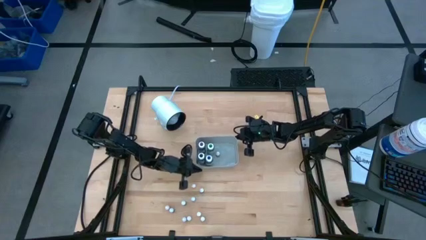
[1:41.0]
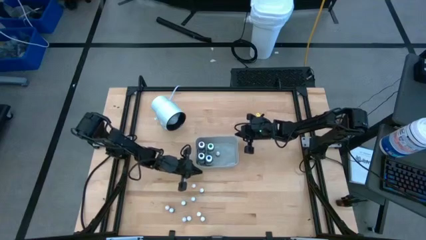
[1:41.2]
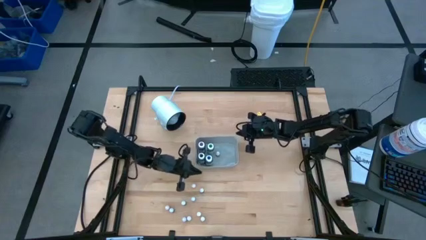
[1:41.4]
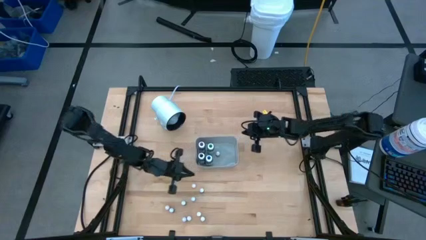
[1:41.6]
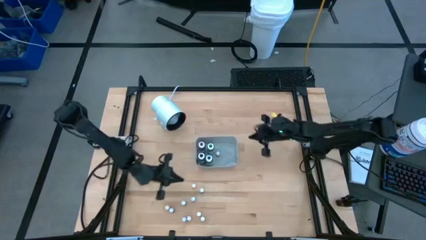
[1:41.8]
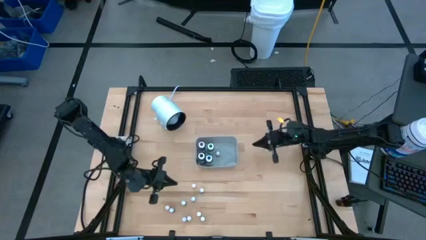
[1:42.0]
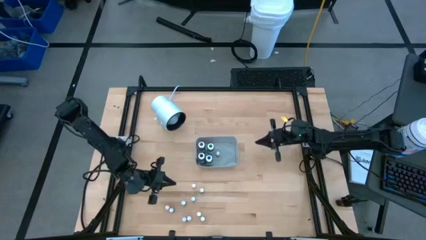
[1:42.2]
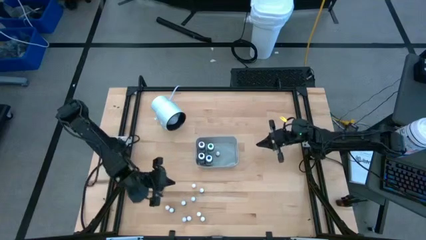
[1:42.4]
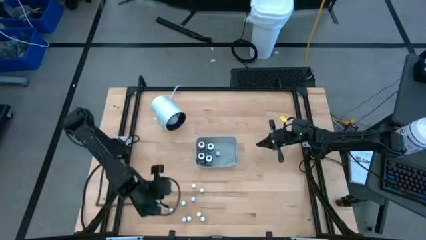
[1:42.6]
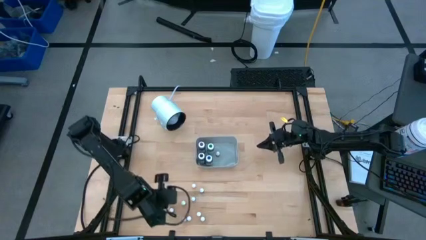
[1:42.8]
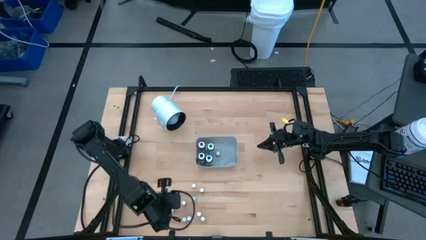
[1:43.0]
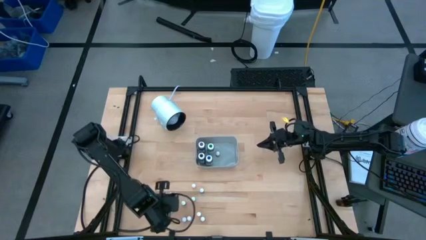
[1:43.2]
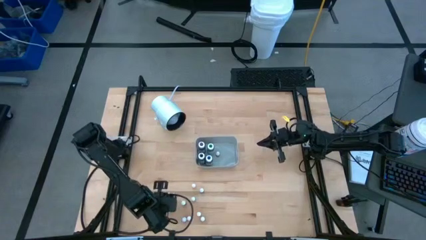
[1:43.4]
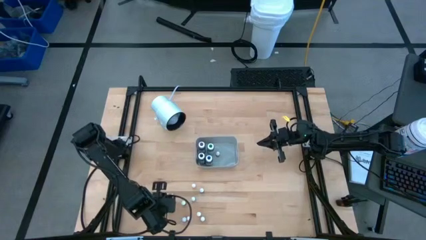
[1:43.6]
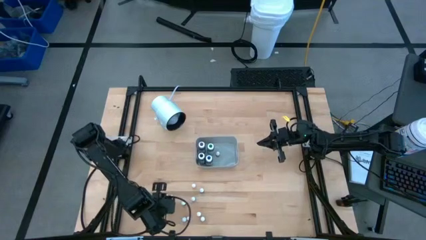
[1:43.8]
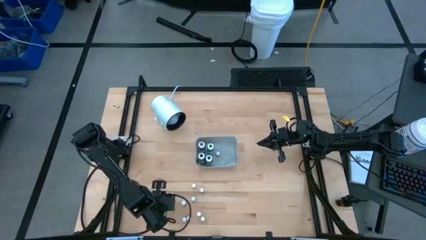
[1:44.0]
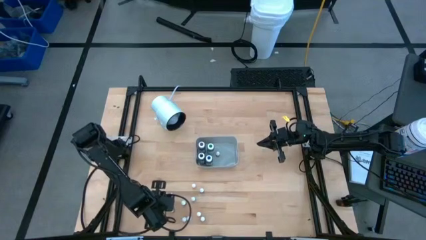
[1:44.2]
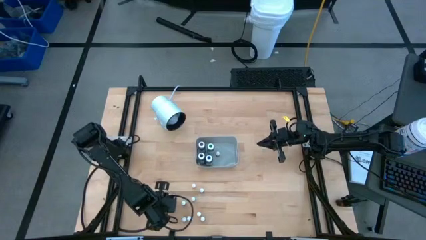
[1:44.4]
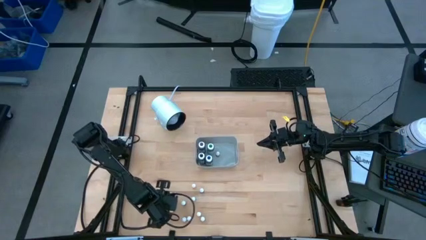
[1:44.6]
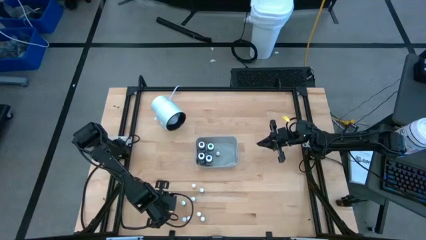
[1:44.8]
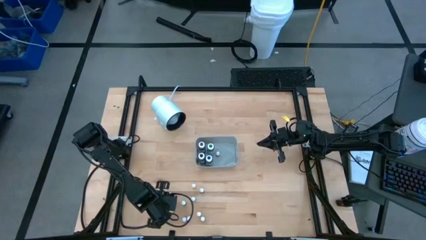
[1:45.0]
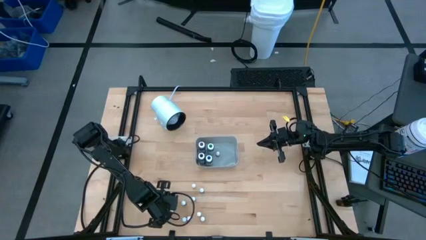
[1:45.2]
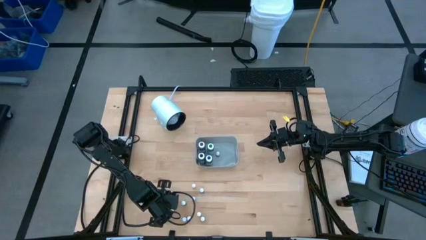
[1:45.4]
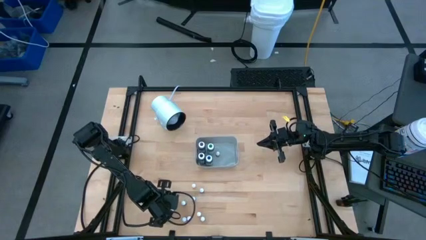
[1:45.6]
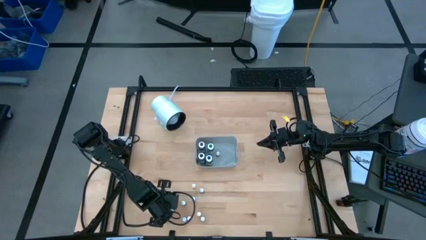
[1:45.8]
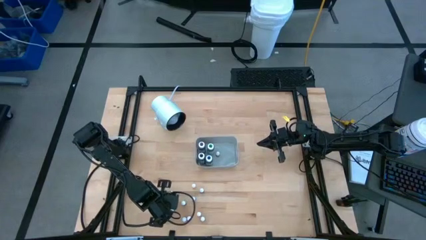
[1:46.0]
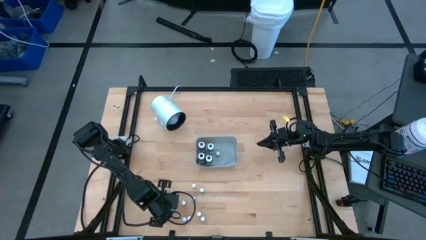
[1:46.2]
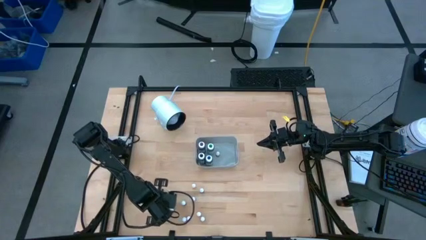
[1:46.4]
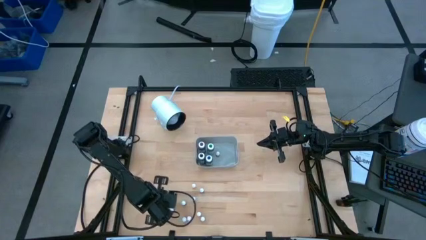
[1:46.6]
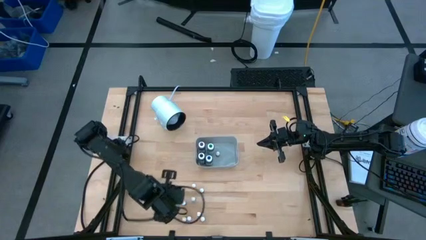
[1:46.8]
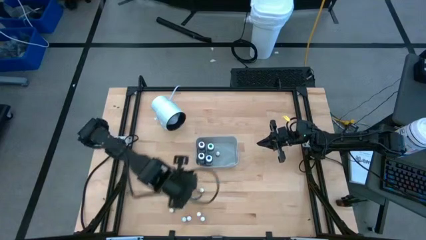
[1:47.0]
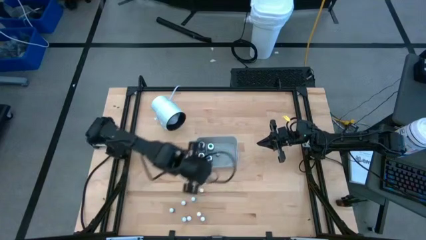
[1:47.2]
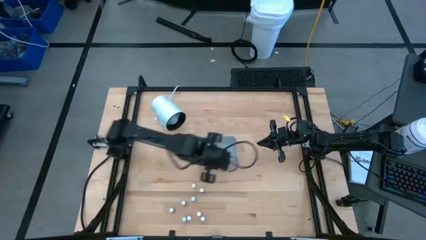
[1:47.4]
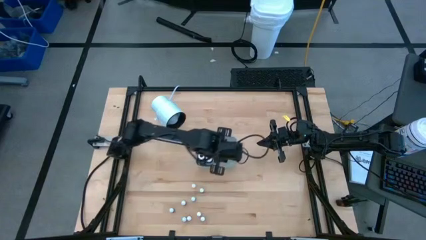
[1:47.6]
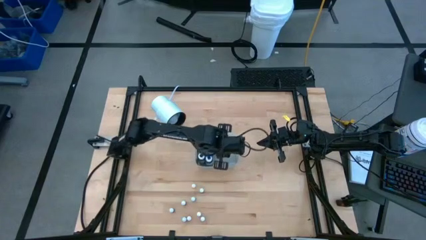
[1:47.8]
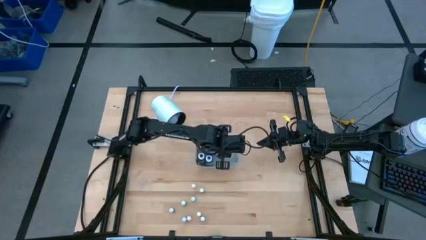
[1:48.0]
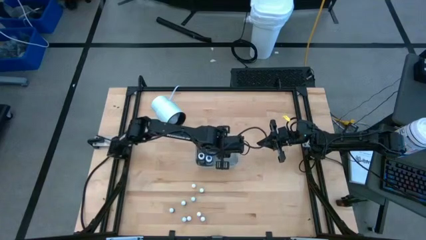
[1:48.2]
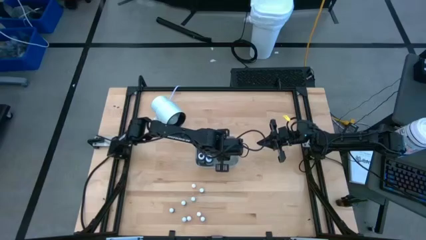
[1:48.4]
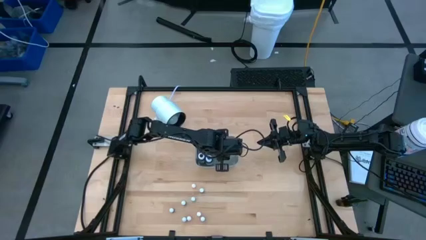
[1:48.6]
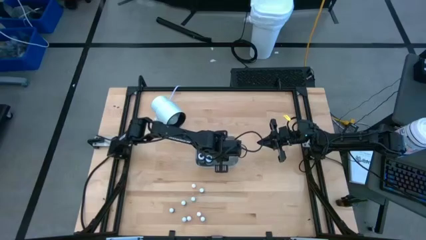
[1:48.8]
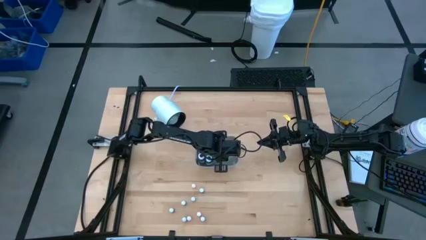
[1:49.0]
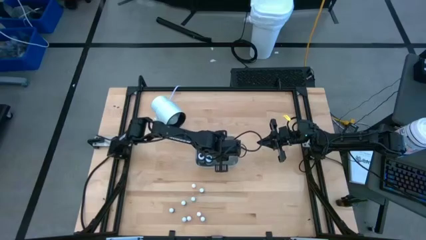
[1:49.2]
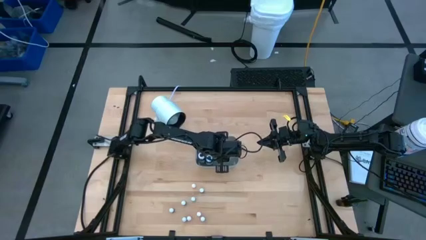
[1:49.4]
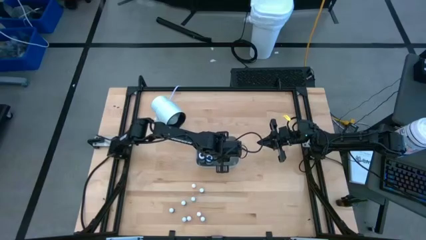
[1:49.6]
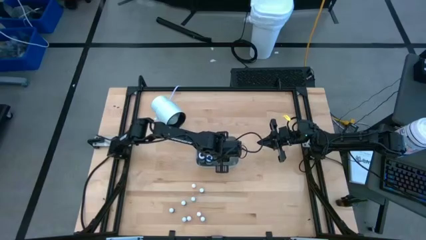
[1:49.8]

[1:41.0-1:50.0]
Task: Pick & Place food coloring
Put the small orange food coloring bottle into the gray bin

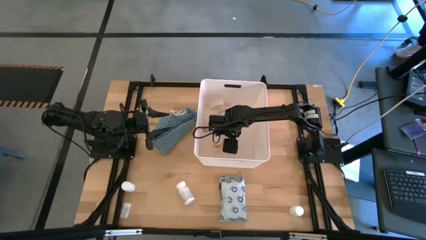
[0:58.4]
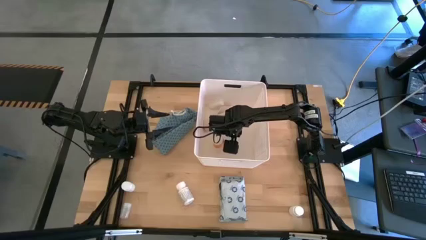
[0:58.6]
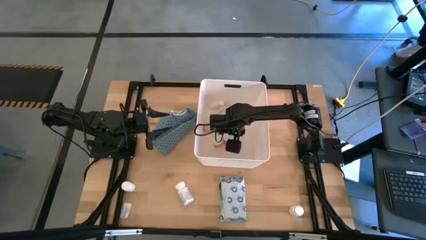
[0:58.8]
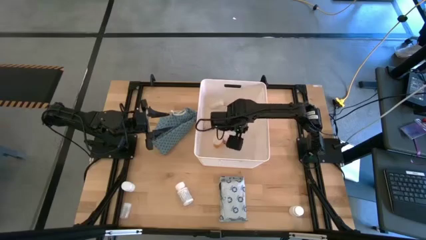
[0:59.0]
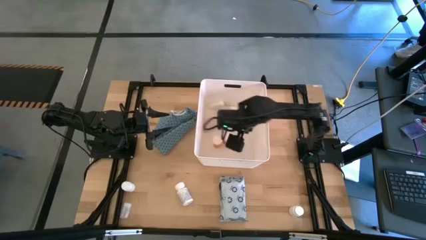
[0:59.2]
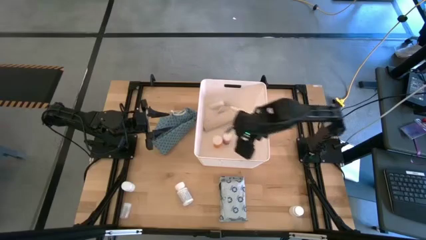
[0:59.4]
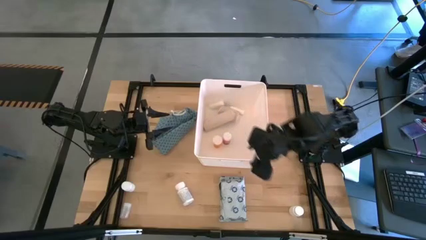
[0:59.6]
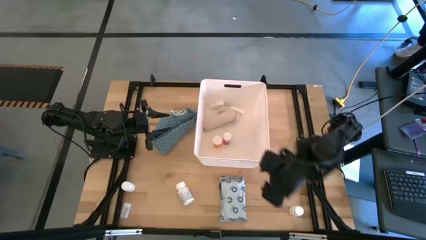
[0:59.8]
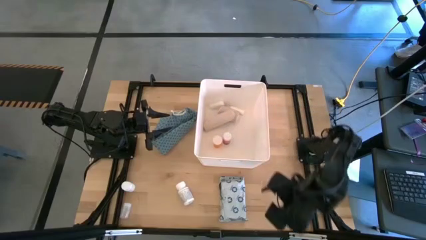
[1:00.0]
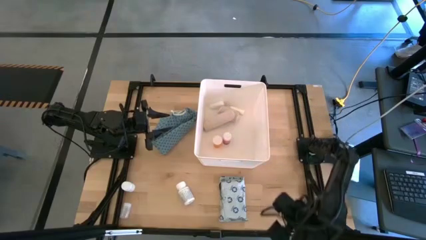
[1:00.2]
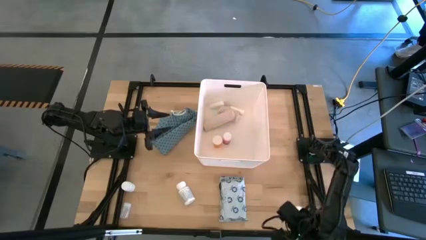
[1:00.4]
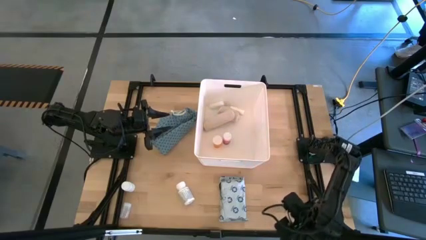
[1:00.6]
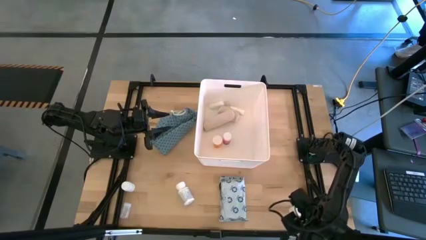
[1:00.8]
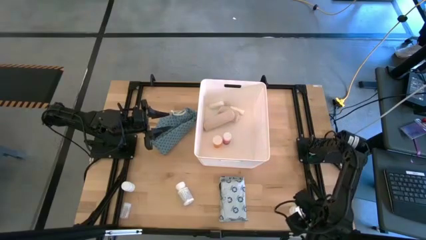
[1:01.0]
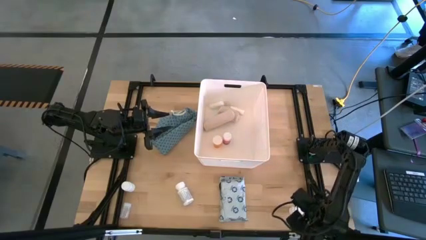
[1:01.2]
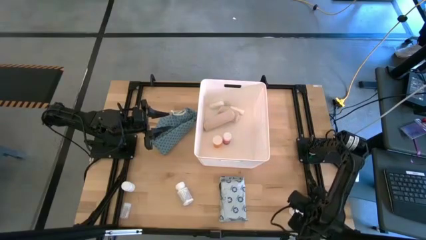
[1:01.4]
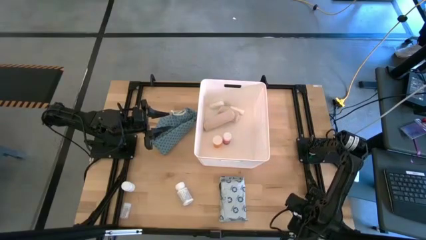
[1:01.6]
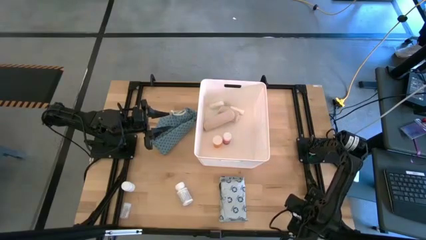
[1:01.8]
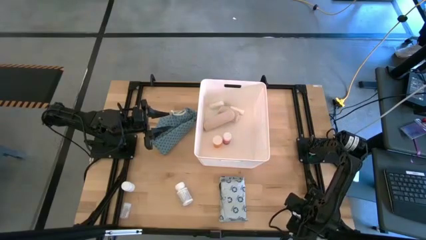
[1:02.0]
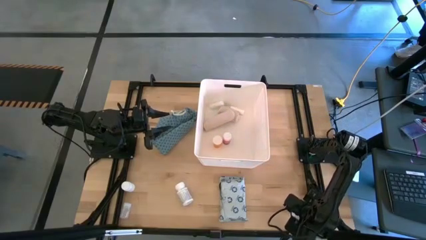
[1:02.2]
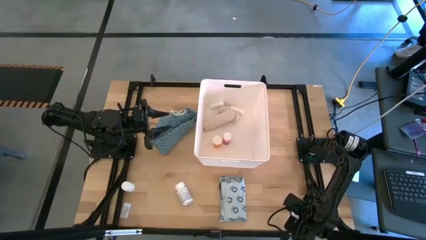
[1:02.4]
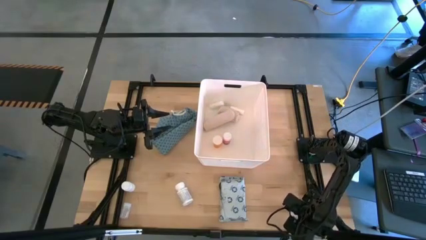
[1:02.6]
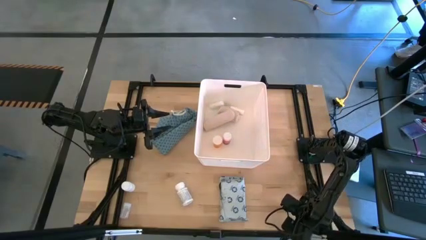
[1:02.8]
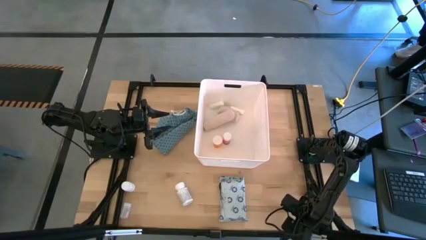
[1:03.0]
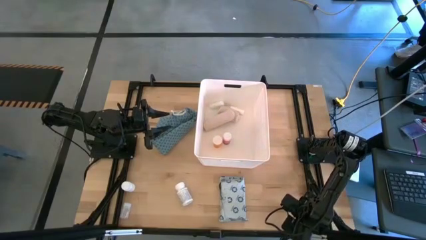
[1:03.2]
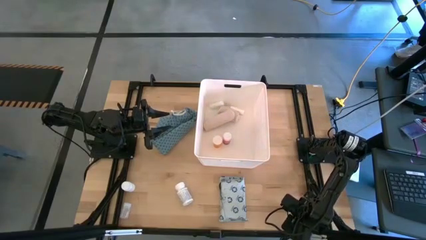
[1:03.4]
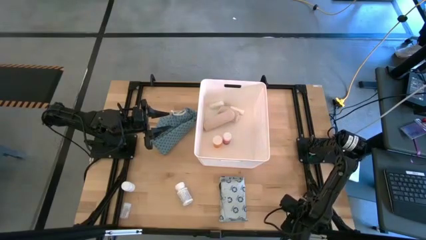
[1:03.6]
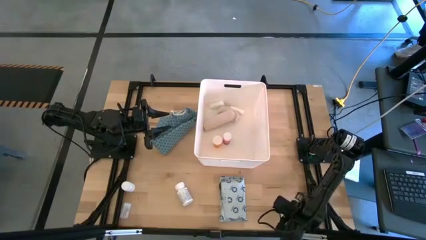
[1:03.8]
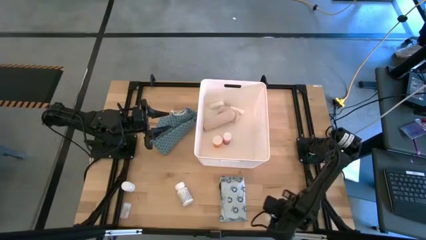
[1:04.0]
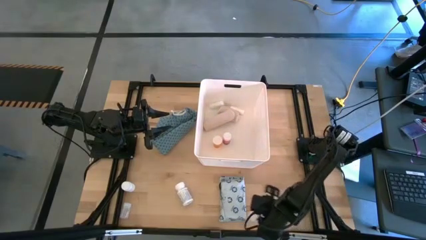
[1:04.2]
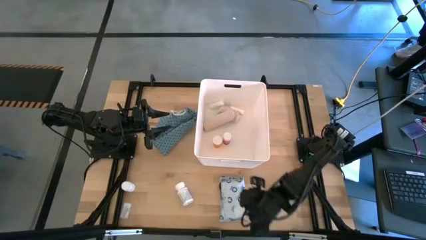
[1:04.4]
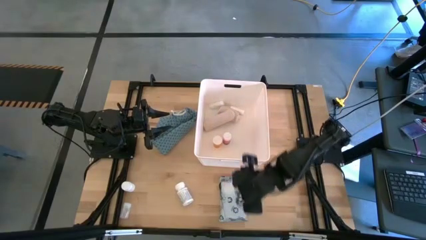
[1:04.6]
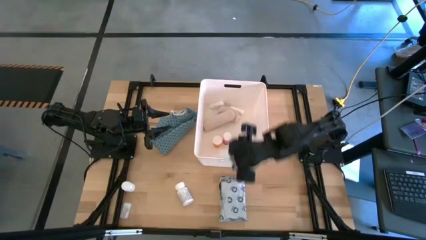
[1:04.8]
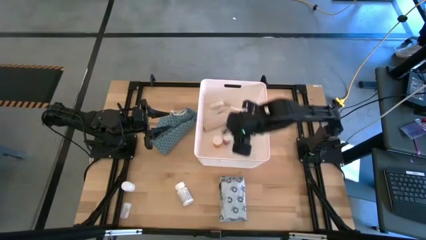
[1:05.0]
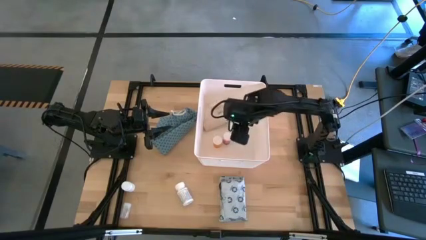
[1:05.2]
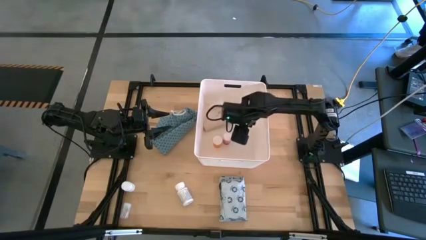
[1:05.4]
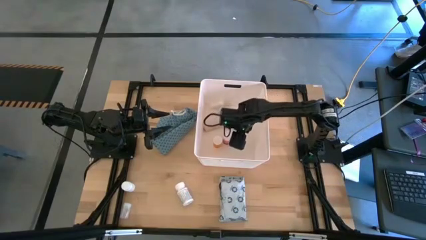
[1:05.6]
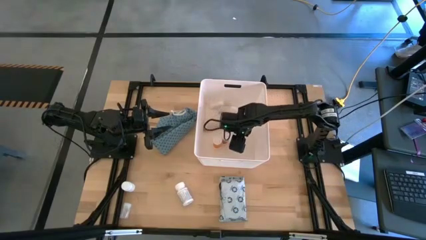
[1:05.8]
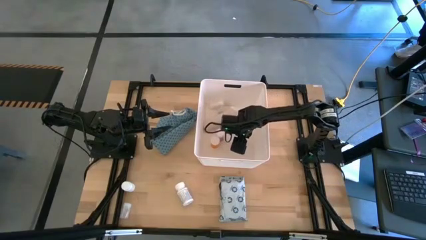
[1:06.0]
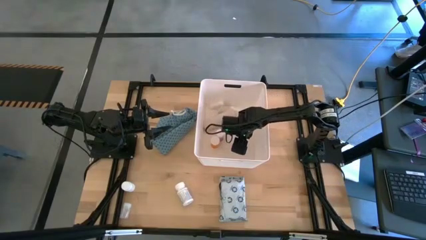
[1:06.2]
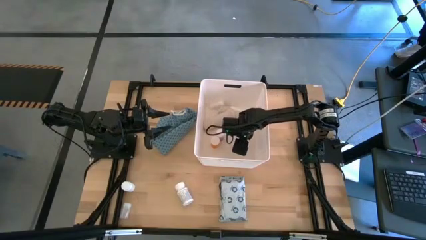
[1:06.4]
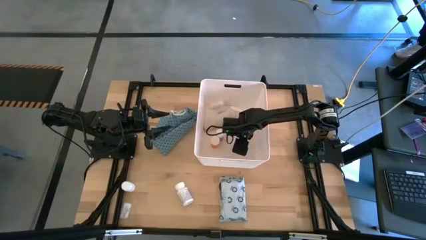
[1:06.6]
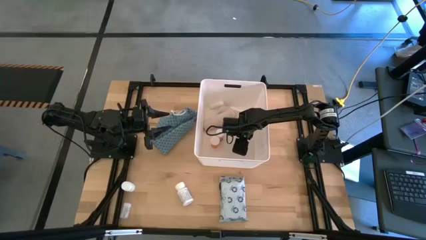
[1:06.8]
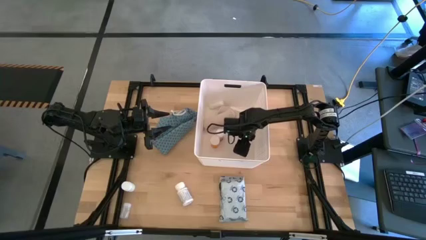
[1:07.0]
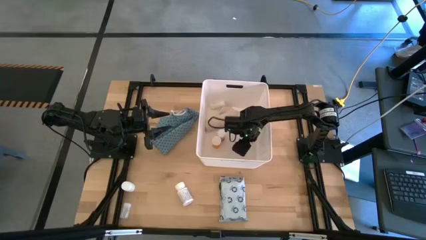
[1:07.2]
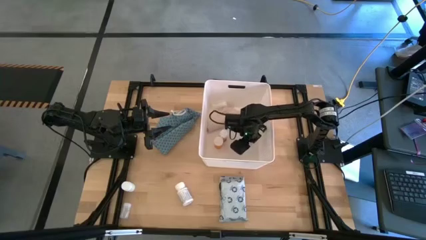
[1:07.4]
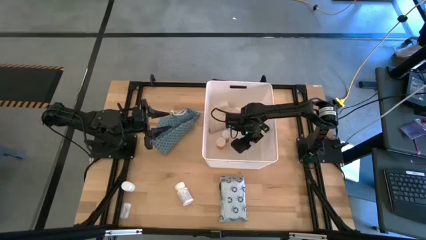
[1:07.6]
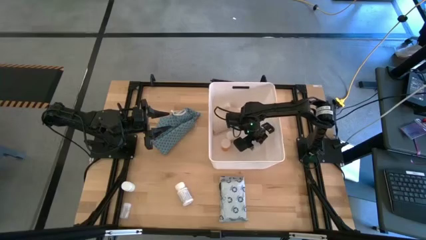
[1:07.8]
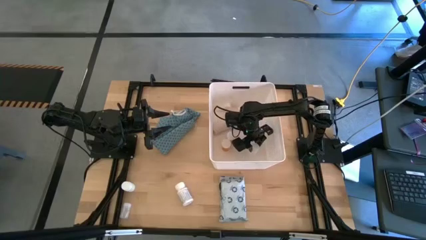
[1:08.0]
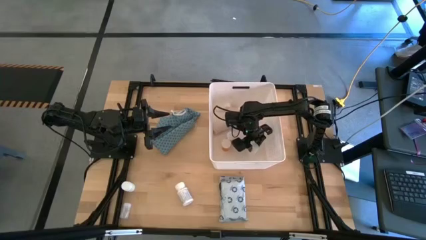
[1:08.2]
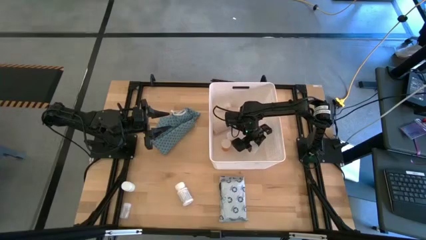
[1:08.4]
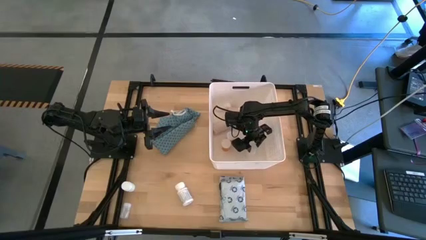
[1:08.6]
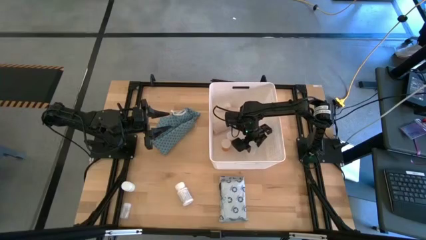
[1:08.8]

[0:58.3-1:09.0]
Task: Pick & place medical supplies in basket/bin
Put the bottom white medicine bottle into the white bin
